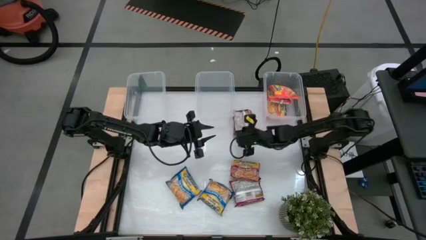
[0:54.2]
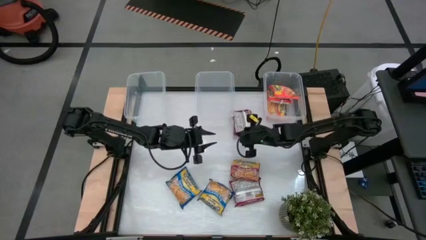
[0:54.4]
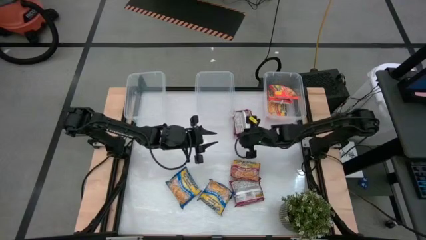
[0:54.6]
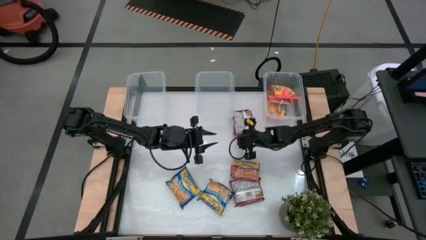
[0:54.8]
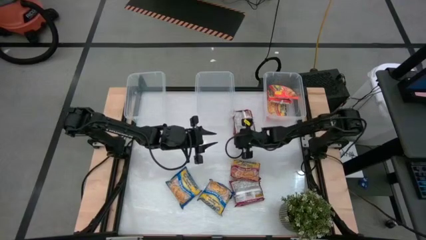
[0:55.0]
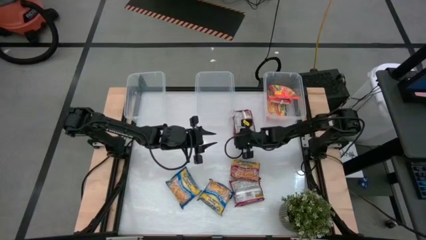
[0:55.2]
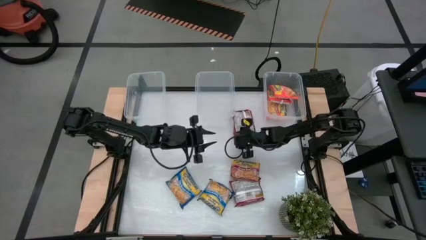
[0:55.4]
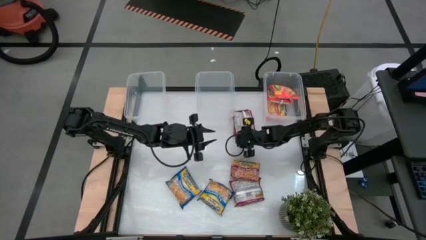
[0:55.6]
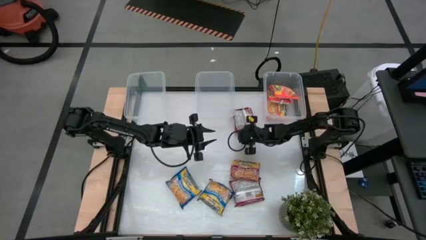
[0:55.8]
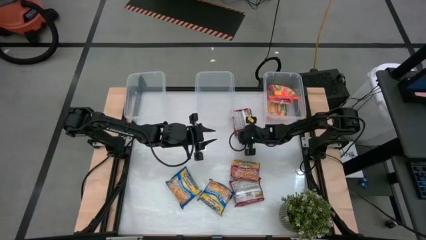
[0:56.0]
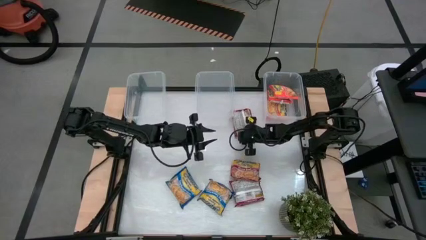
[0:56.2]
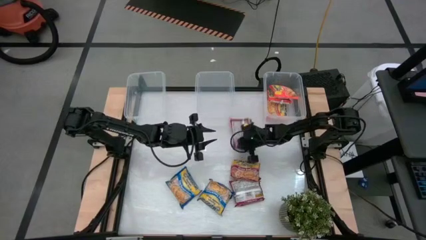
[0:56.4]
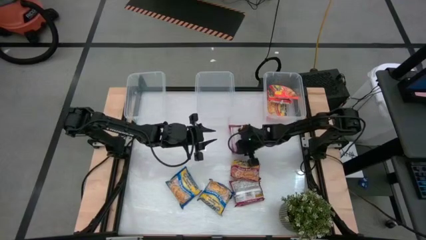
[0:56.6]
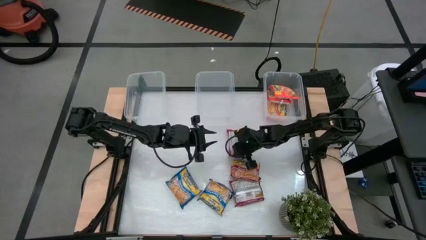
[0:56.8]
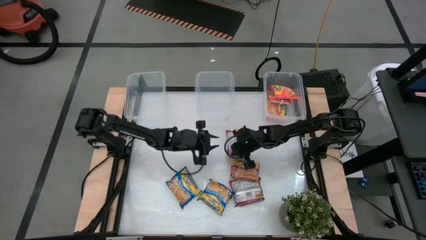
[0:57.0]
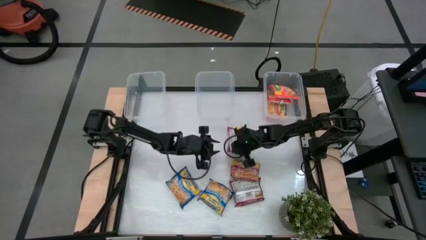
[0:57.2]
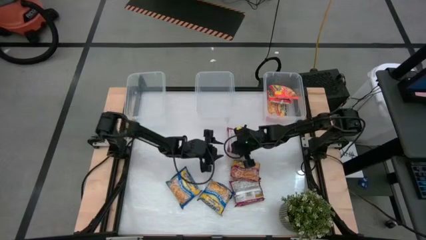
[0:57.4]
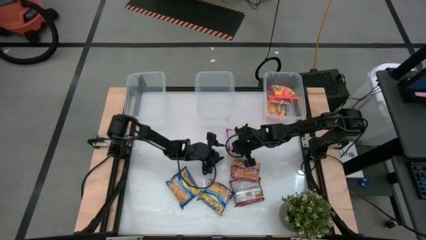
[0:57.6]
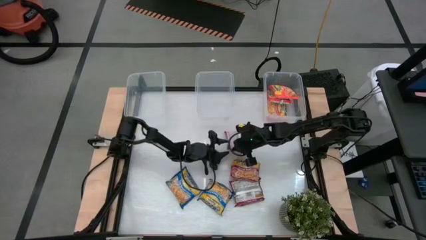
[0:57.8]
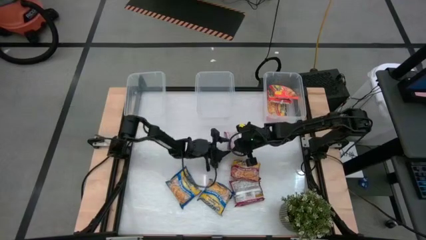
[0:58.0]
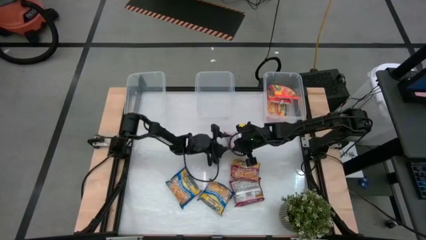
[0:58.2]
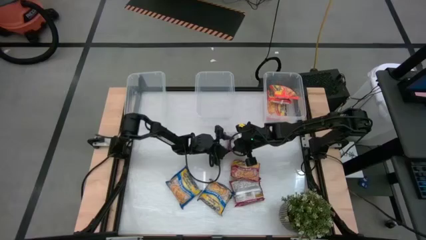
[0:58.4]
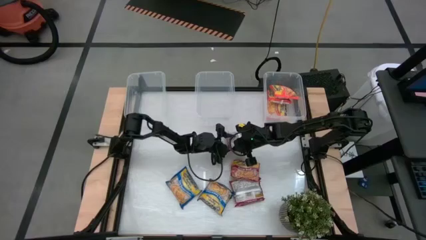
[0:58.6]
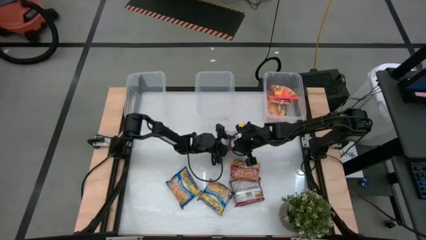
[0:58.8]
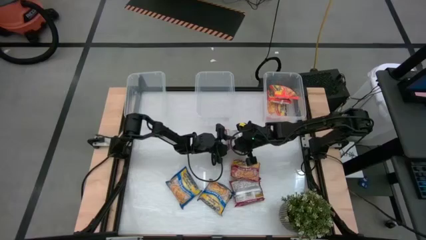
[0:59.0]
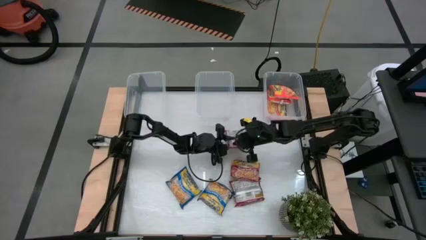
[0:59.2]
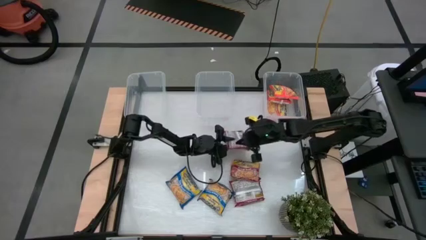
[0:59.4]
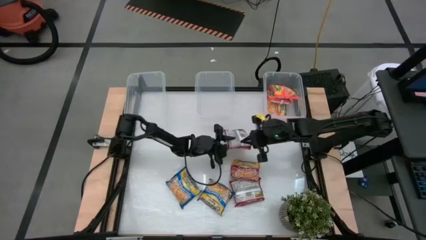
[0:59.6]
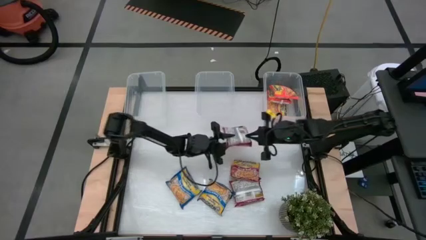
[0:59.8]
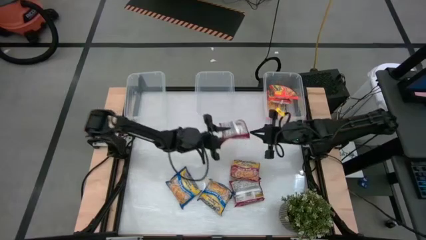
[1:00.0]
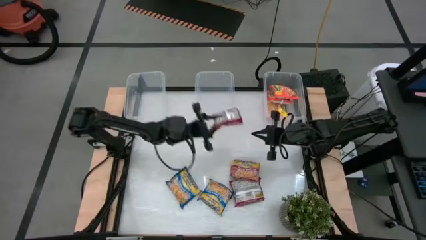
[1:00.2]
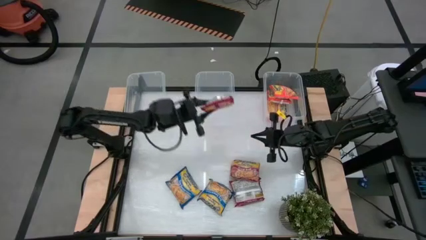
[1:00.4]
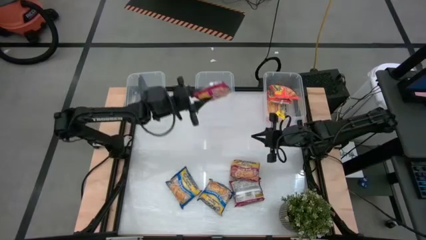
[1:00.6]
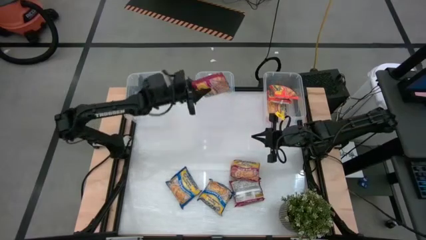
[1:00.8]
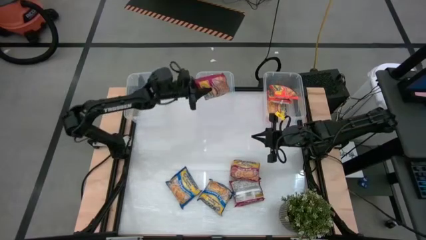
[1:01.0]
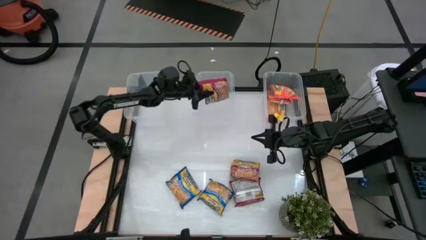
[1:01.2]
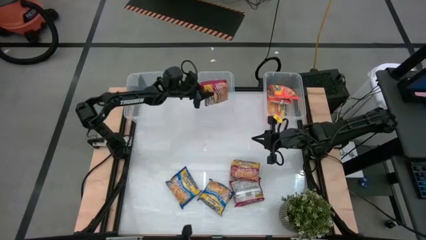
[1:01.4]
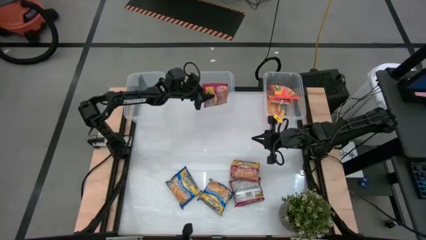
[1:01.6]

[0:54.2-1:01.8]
Task: Sort Maruchan noodles
Put the top red noodle pack into the middle transparent bin

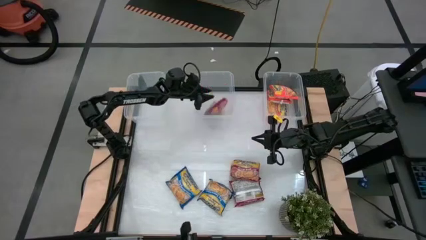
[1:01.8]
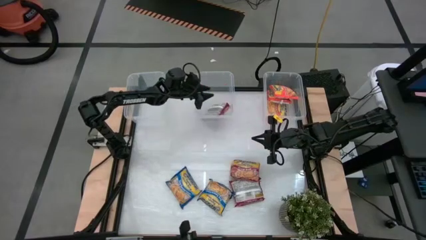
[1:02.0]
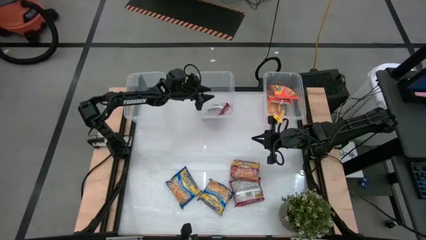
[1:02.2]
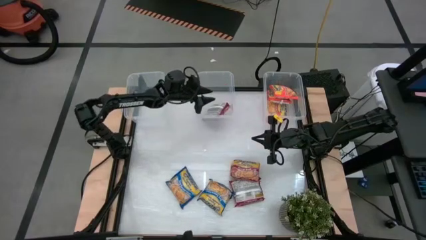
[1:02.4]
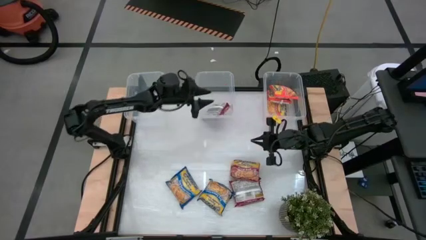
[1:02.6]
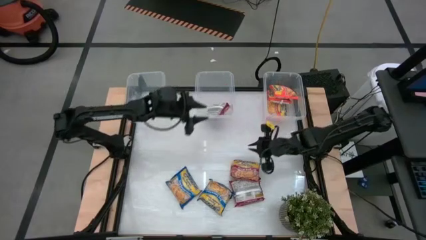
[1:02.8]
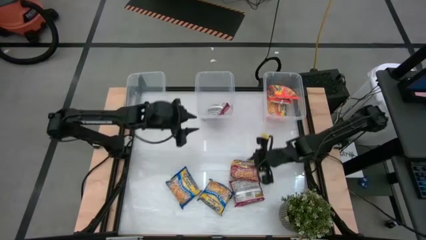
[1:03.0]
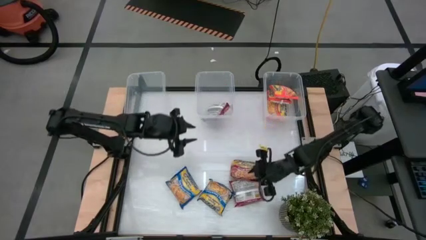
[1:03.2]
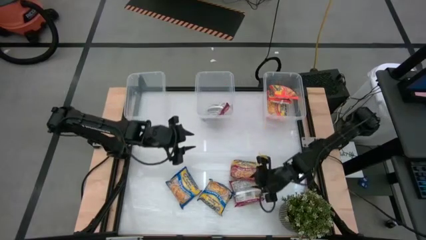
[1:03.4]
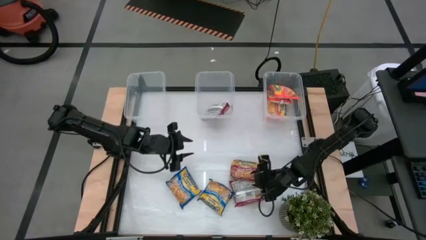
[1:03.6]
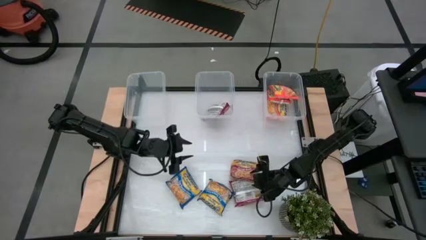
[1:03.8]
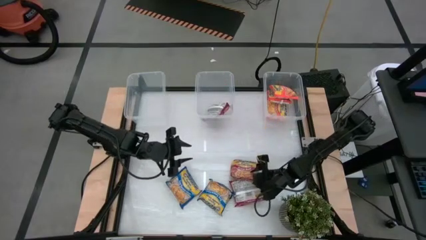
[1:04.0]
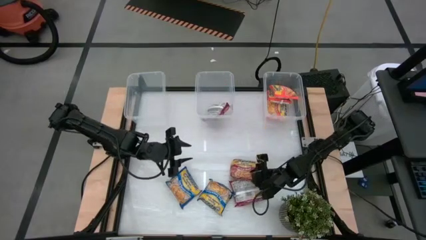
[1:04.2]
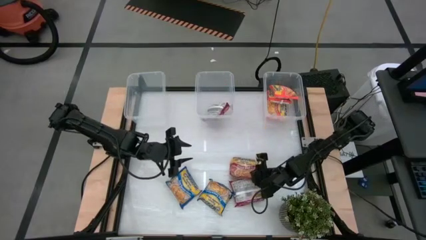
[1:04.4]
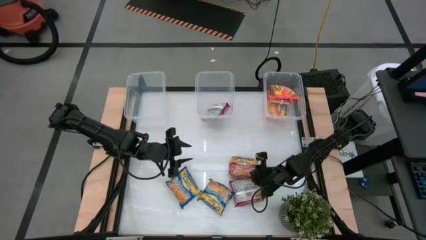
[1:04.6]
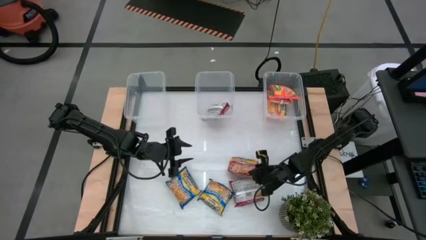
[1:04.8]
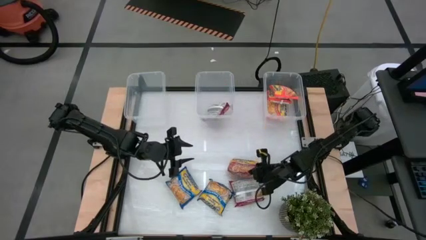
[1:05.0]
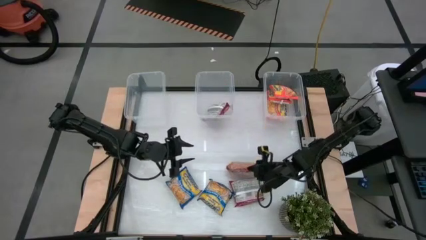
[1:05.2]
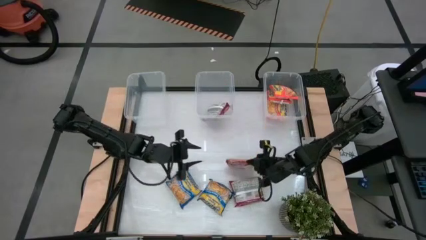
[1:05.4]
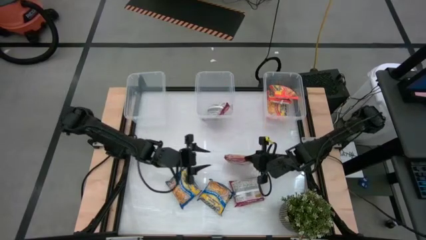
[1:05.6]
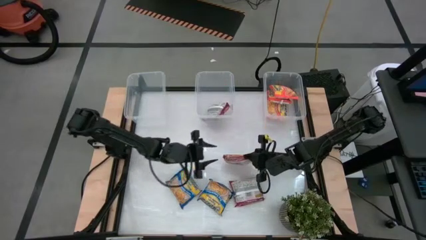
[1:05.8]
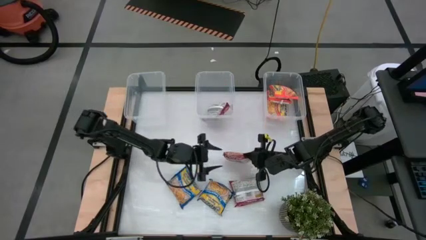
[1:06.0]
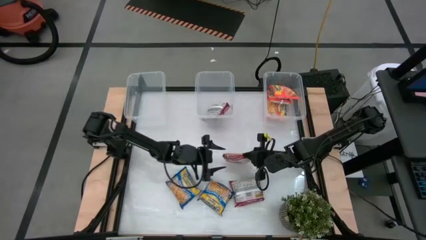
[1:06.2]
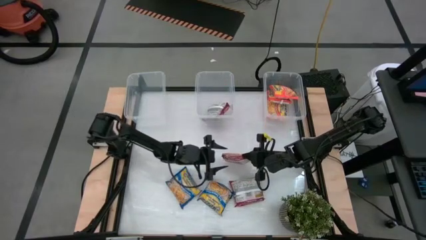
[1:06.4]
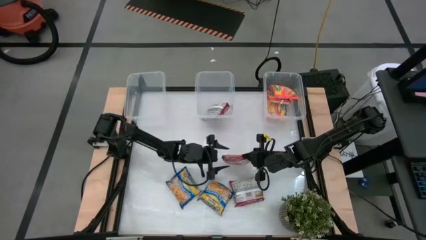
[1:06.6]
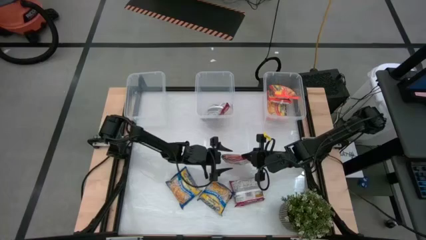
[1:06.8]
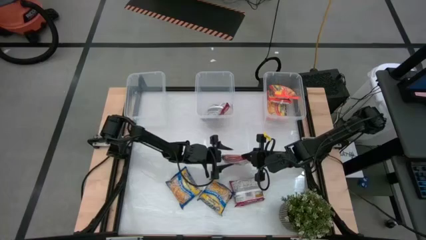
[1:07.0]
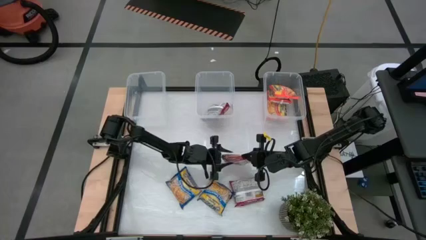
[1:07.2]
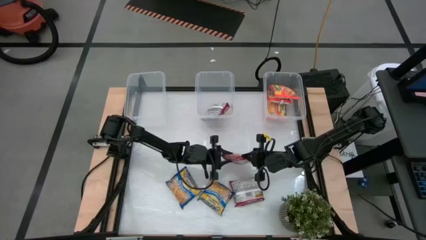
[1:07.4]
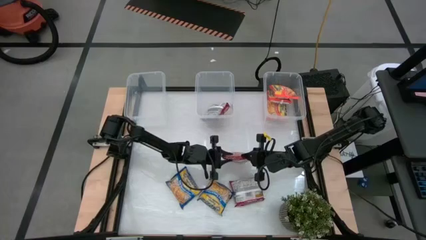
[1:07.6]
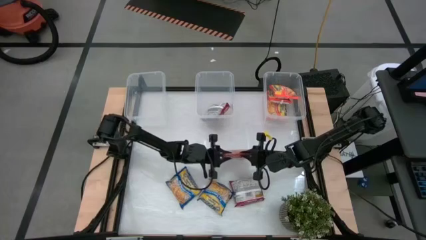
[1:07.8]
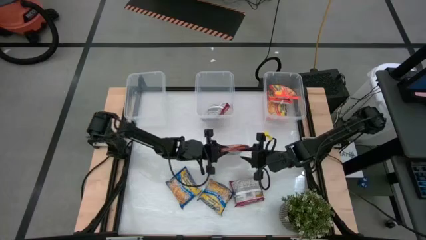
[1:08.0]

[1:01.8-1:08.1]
Put the top red noodle pack into the middle transparent bin

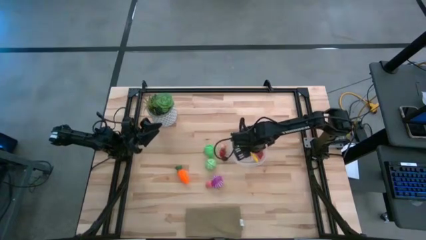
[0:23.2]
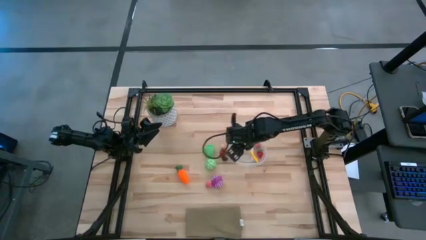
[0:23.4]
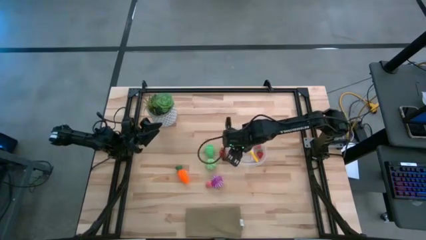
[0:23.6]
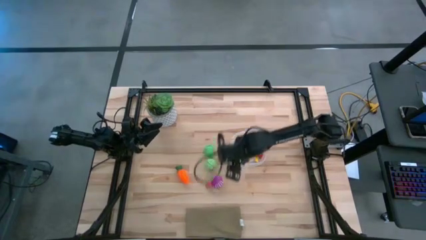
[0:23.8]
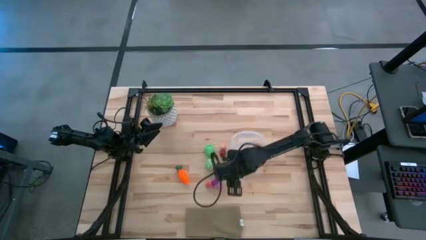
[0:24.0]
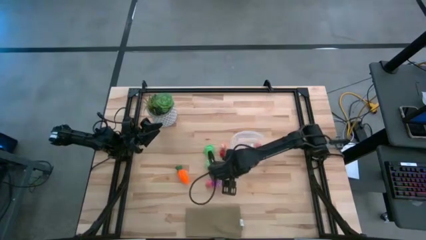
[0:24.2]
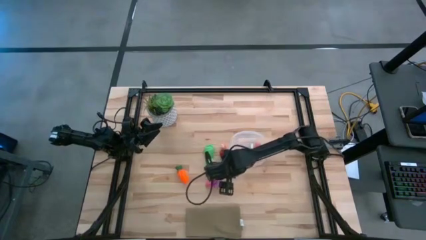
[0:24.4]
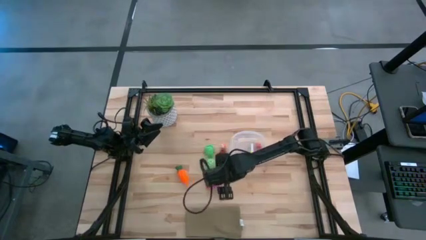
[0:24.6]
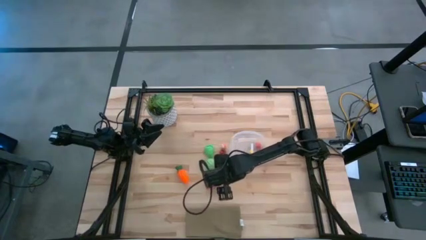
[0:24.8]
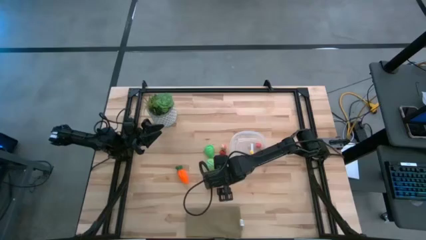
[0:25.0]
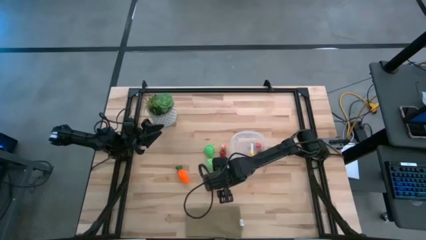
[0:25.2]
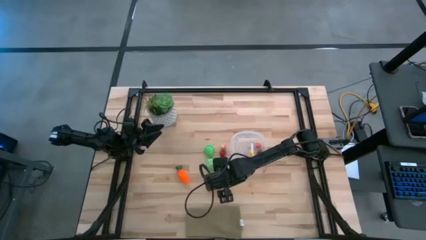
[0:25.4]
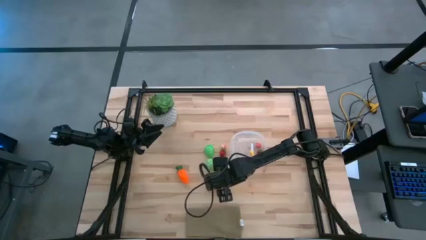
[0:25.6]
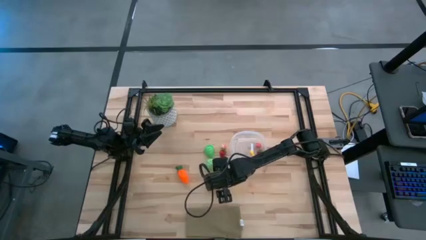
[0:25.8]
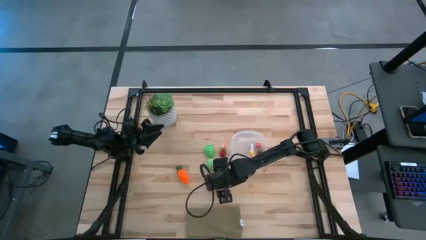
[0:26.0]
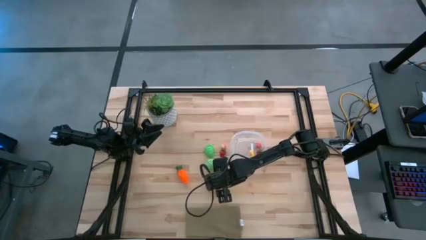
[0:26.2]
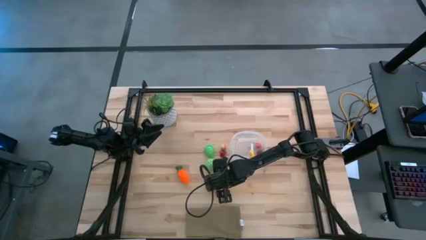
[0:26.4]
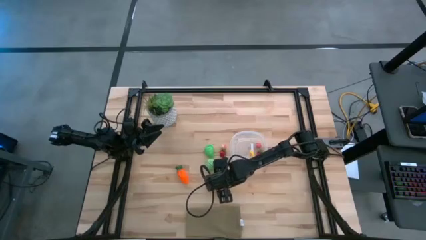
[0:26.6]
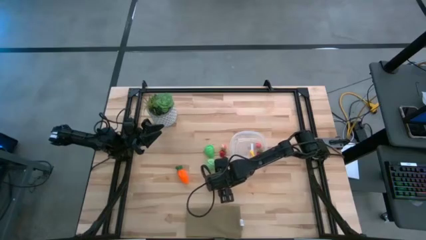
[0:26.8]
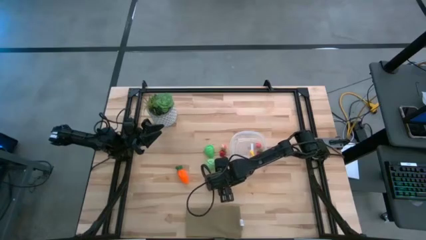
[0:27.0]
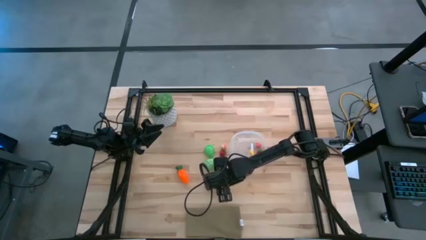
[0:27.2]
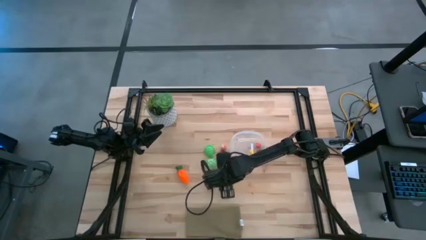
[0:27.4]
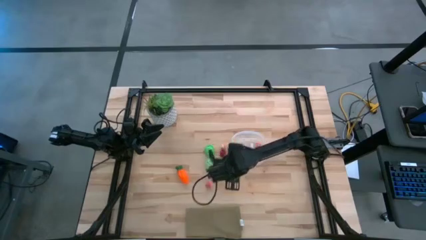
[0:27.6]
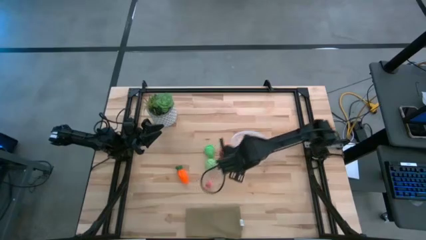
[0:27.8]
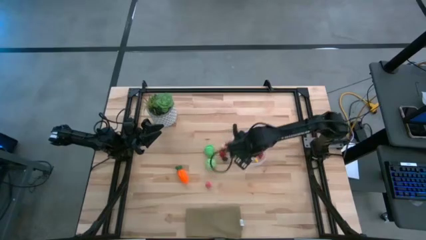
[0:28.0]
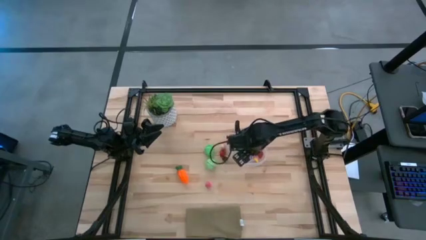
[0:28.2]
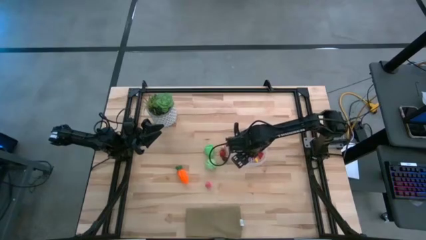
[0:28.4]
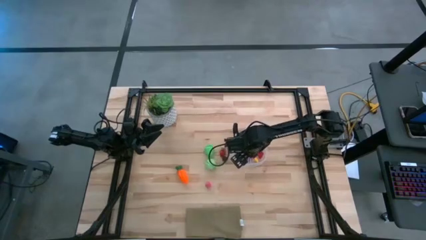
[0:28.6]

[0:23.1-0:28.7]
Task: Pick and placing Produce into tupperware
Put the red onion into the transparent container
